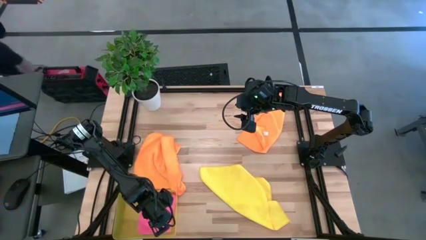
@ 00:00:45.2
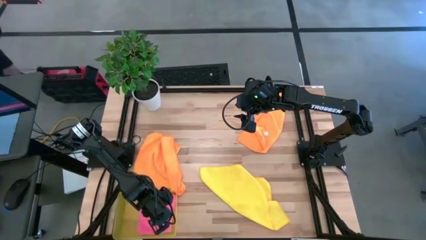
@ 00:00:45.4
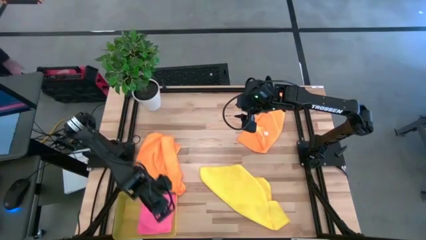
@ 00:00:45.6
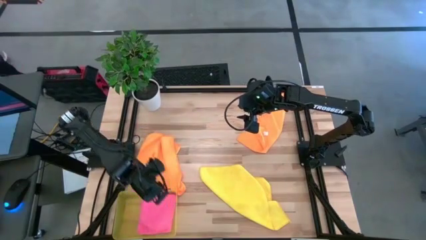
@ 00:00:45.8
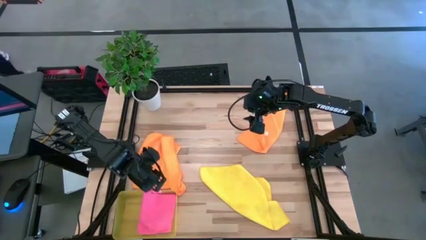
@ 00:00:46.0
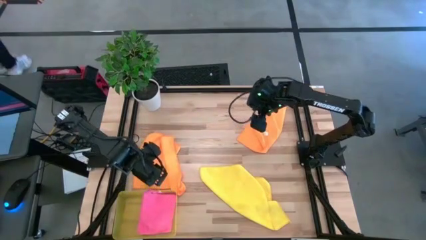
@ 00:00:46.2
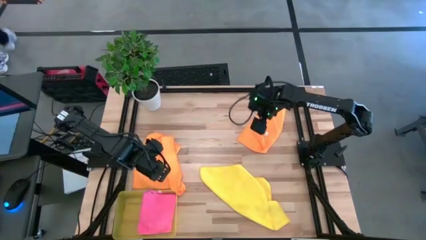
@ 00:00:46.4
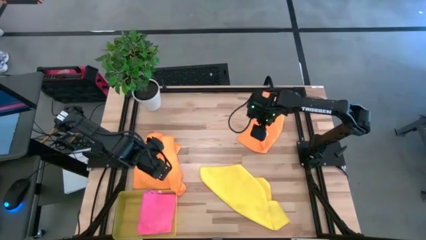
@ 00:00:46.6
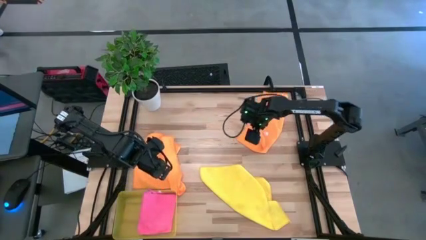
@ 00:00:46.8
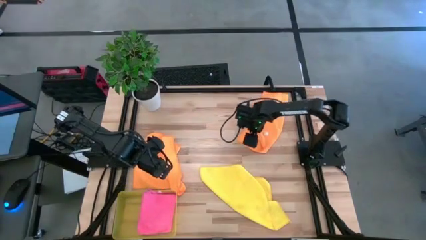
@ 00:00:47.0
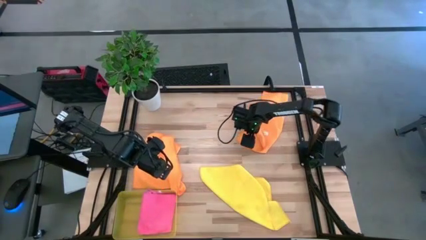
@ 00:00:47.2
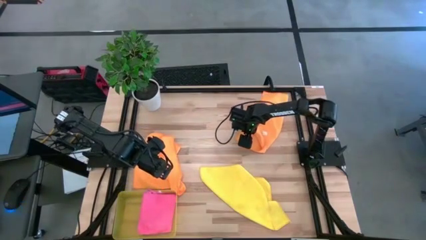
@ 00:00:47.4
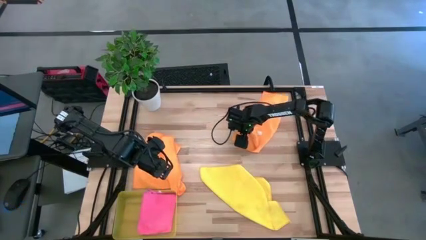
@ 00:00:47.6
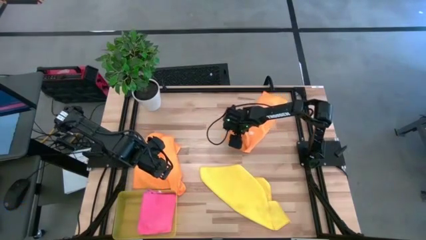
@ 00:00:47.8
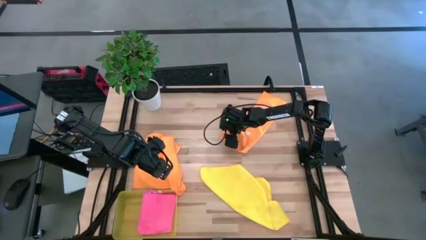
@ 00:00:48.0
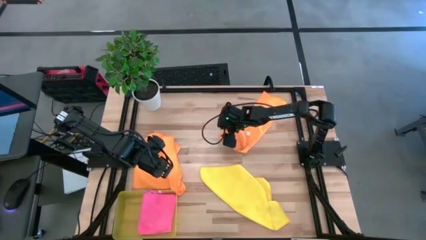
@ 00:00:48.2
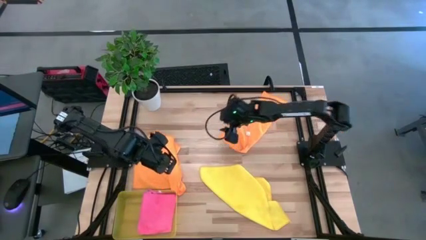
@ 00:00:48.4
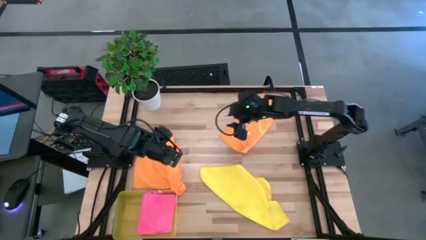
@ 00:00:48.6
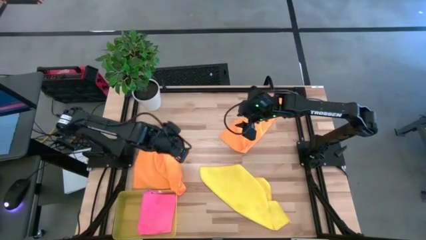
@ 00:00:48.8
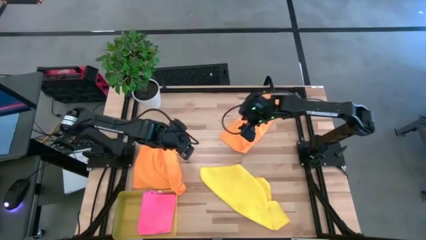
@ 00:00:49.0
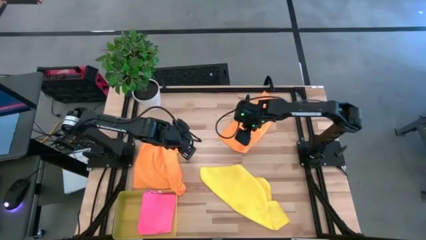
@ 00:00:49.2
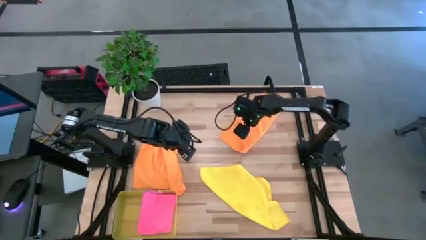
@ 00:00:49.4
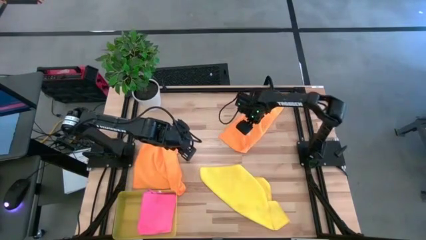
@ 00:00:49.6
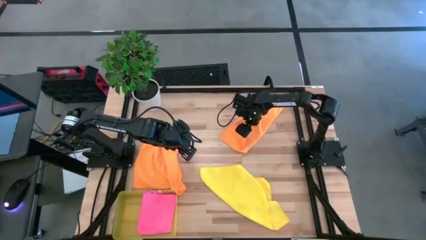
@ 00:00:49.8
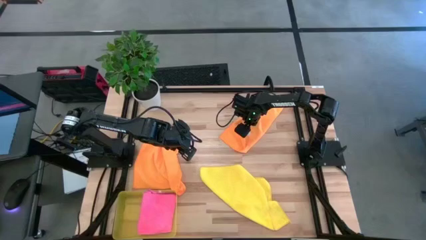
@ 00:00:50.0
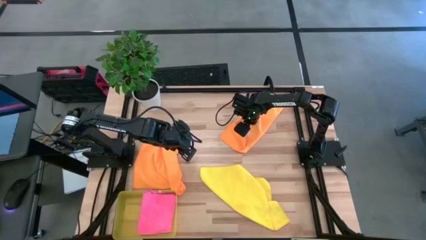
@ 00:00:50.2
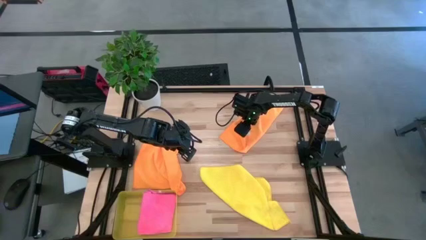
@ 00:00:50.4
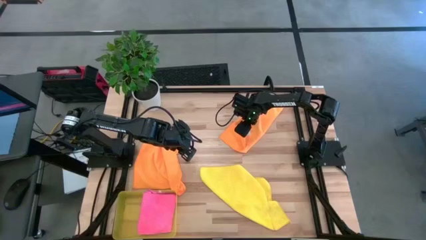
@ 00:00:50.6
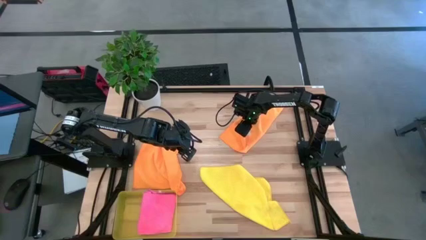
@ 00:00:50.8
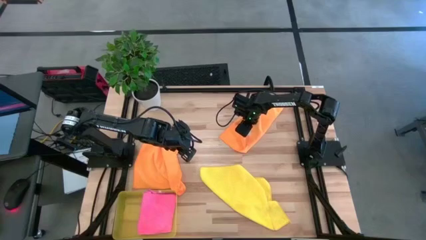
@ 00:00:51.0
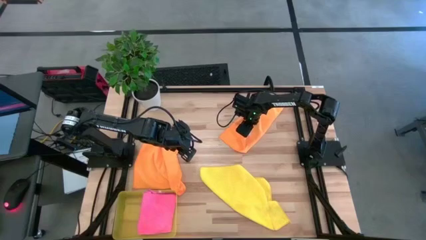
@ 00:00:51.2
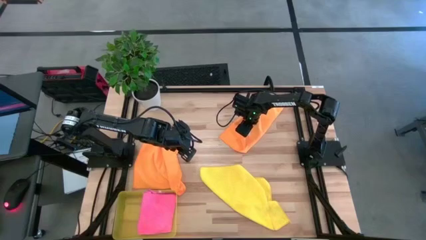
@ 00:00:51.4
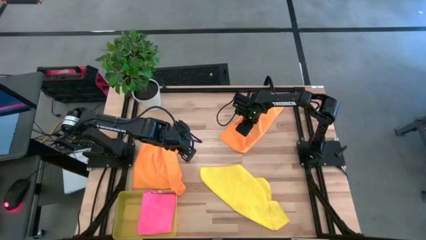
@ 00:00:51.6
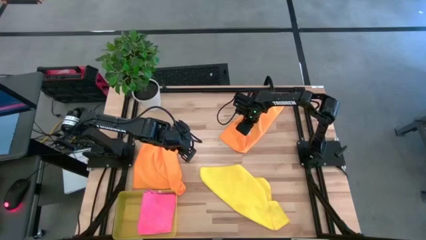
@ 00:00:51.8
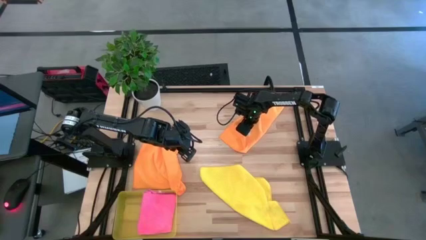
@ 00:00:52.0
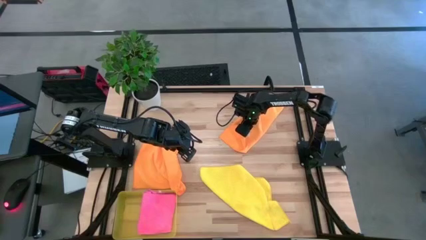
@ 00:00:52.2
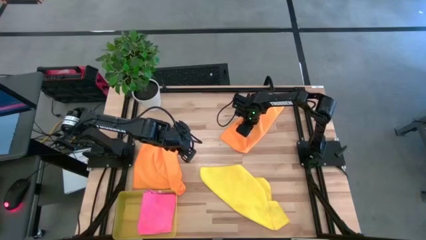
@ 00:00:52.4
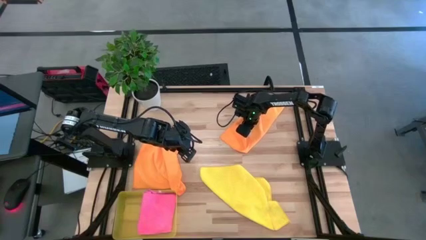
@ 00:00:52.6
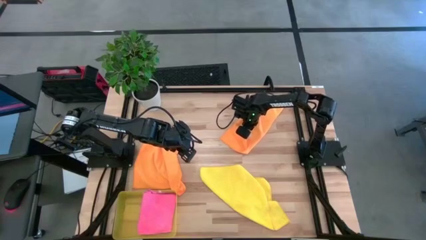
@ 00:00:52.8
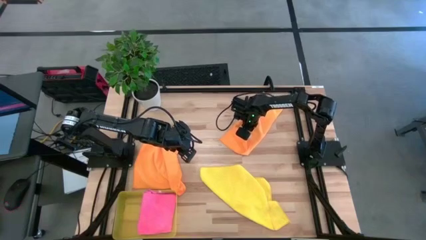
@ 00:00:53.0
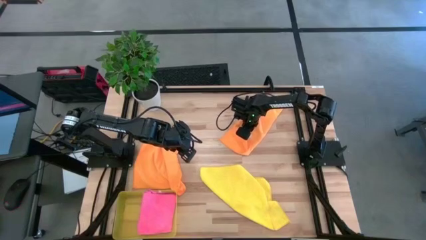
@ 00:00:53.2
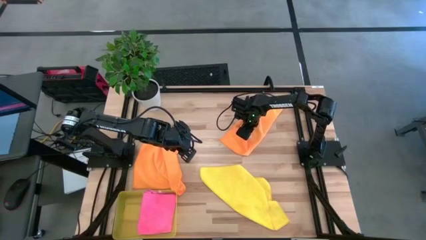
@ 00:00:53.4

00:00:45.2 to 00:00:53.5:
Task: Fold microfiber towels
Fold the top orange microfiber towel

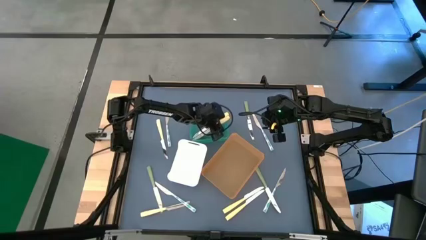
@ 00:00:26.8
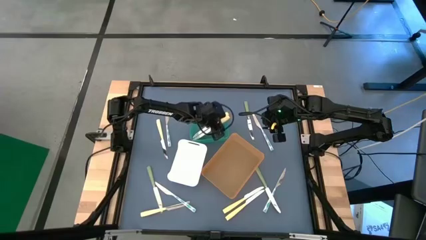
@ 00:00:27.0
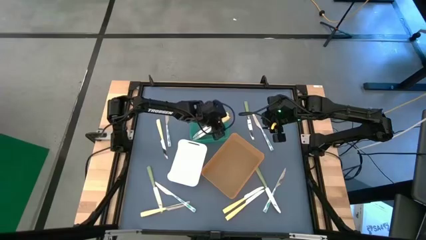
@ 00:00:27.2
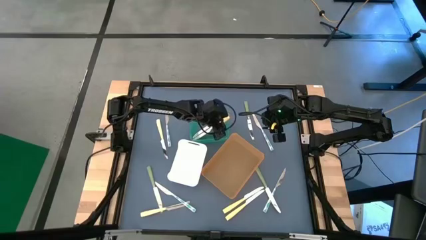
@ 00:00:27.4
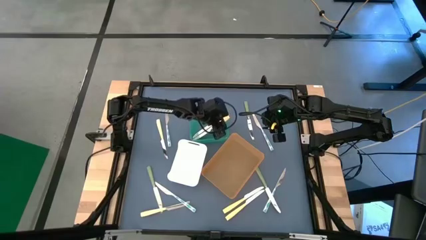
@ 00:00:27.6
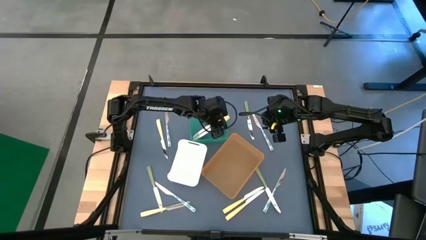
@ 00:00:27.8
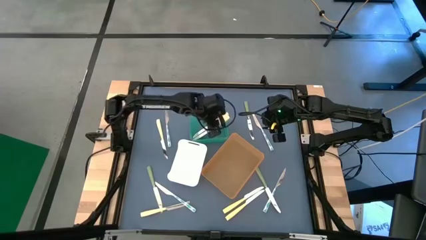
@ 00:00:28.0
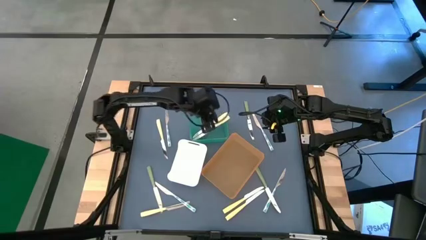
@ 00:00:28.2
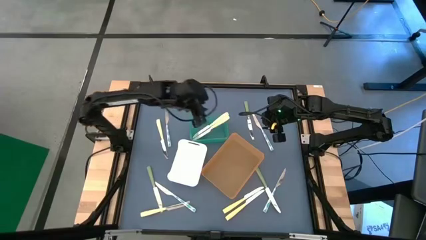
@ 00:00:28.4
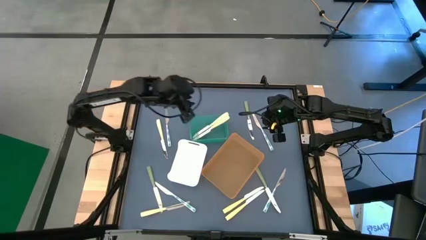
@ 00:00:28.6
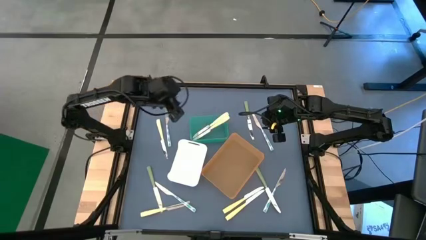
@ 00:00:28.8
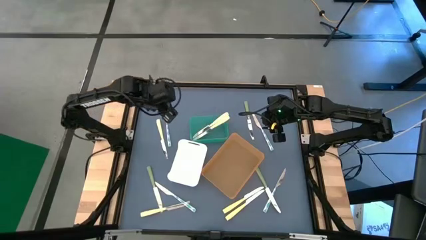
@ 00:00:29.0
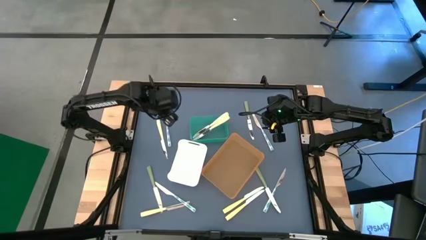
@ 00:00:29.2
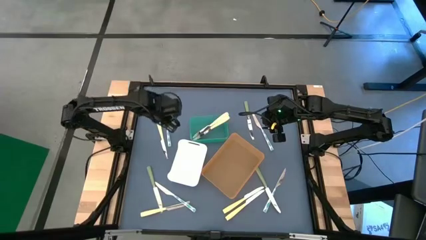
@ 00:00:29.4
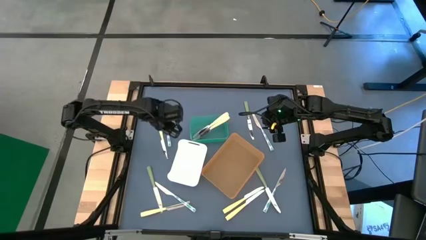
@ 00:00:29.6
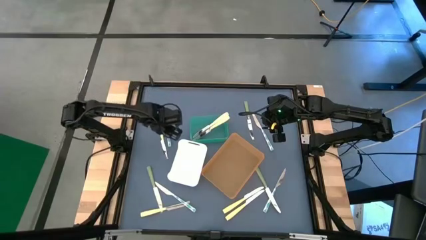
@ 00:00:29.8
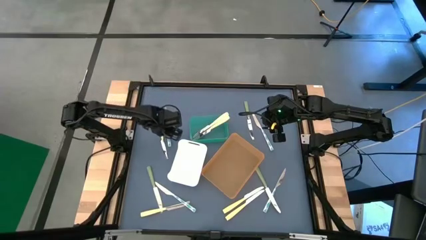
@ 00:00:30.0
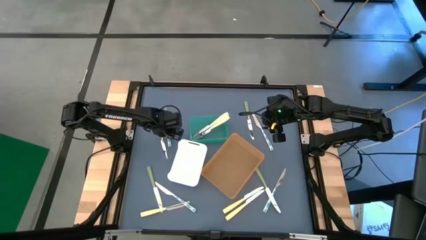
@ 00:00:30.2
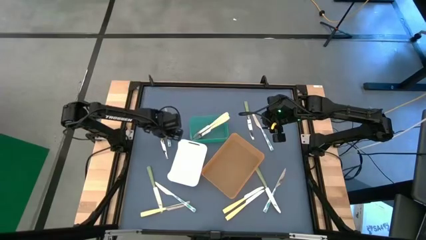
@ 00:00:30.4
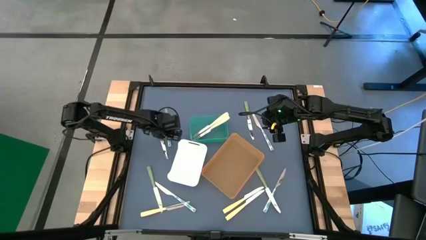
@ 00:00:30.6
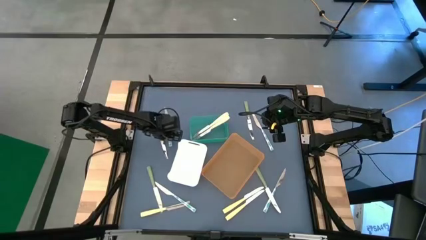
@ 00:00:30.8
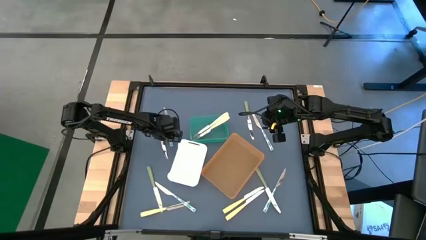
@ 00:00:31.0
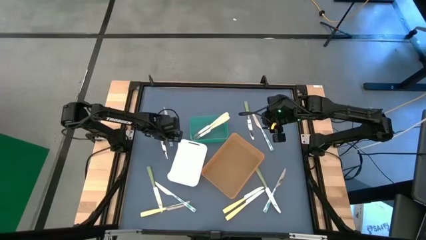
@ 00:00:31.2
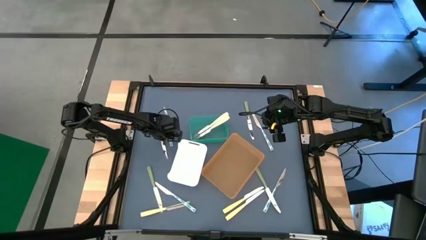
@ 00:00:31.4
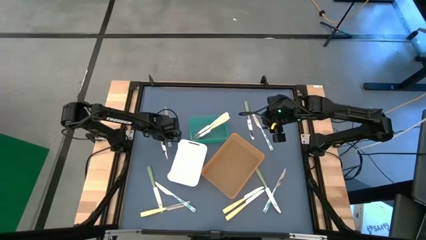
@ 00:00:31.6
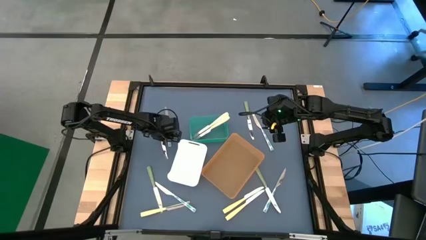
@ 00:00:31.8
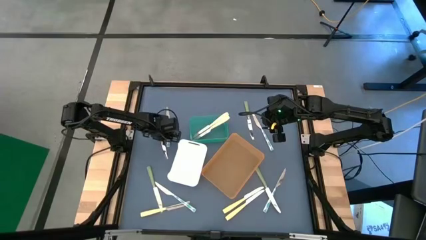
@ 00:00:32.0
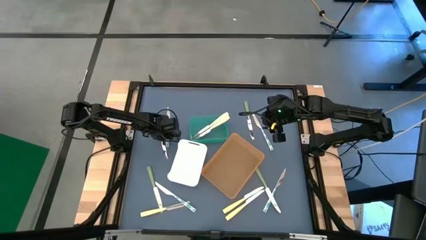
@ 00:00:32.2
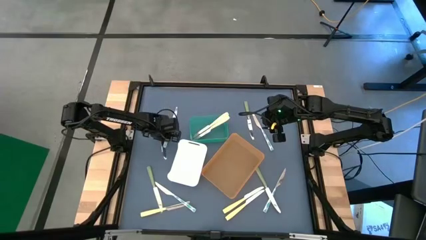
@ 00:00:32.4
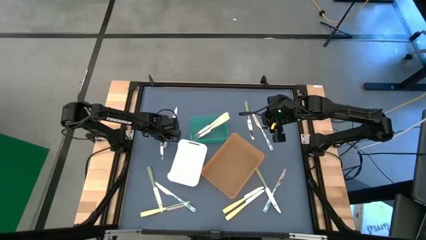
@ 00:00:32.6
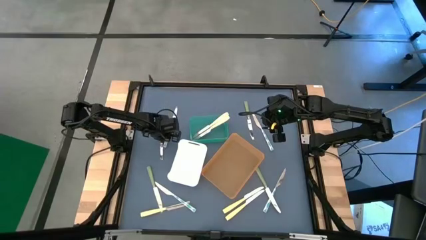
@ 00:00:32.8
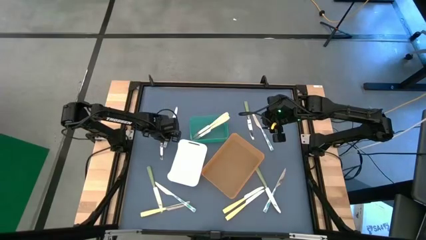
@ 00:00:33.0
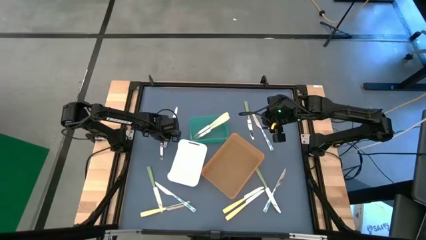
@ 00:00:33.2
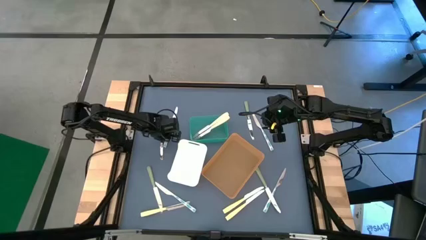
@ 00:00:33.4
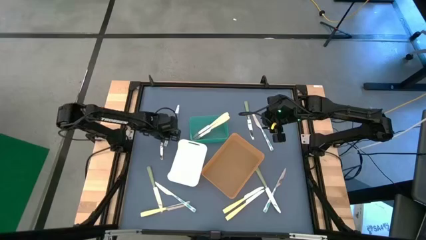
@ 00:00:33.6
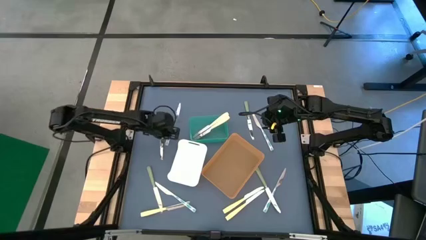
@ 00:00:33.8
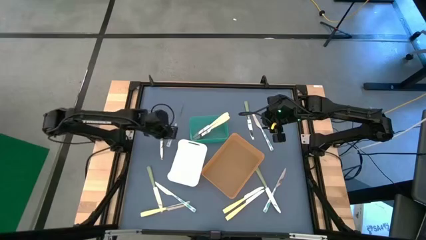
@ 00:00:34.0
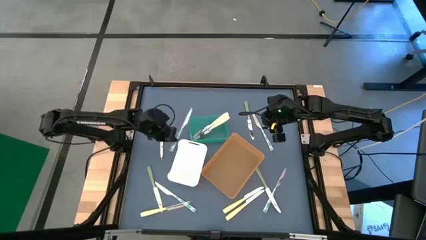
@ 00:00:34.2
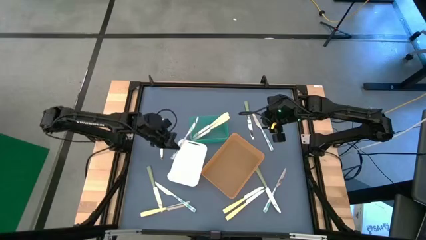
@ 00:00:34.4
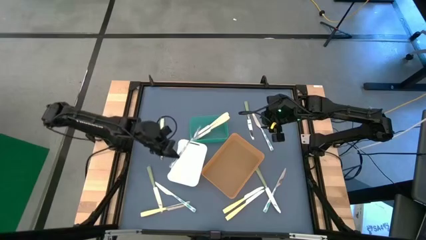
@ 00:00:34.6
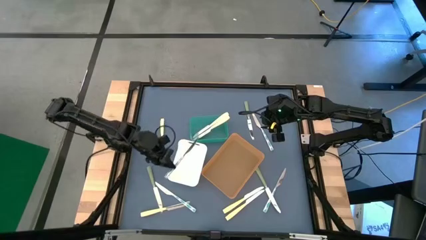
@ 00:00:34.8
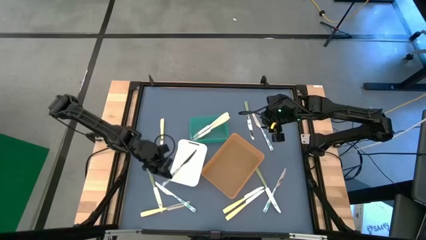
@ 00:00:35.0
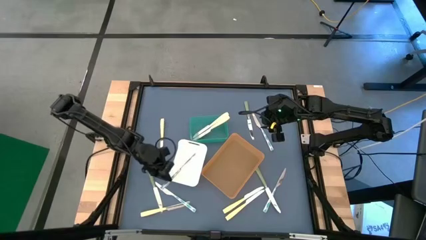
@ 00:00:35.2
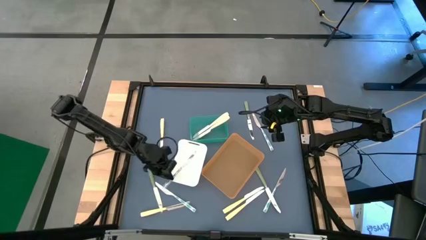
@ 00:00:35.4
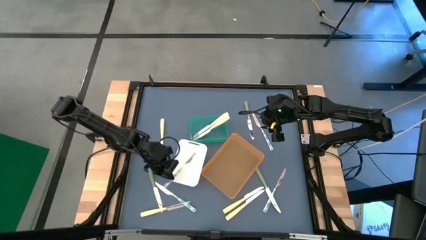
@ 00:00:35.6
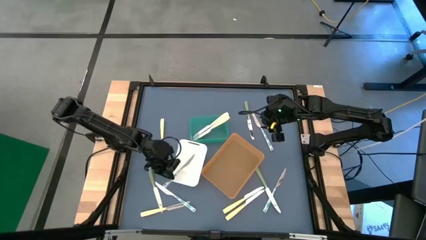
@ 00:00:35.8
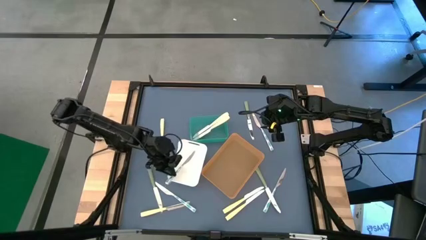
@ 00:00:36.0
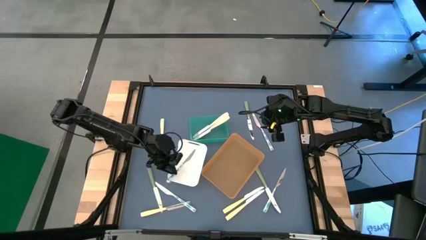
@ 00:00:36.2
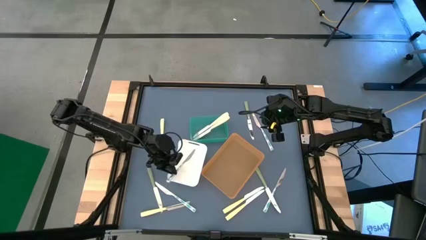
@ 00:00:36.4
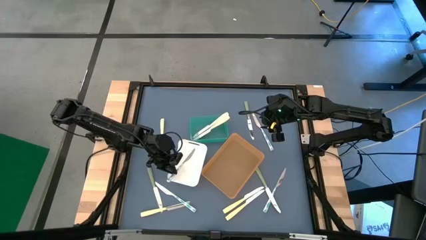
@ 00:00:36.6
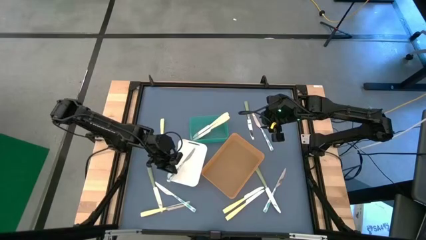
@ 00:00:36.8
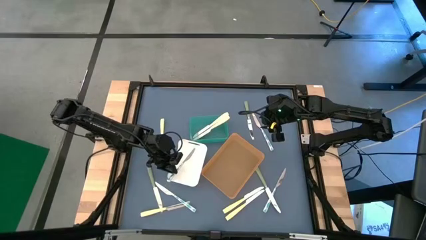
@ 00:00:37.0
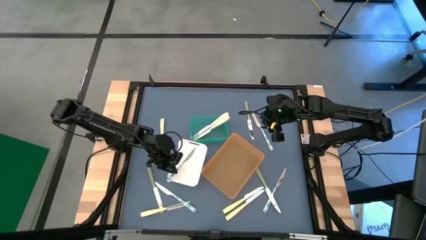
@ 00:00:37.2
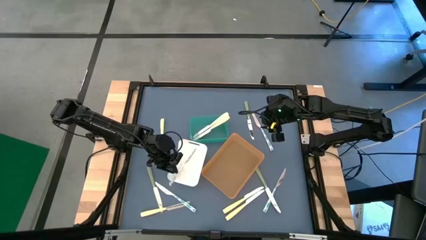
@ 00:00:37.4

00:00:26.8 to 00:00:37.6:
Task: Sort silverware by color (type)
Put the blue patterned knife into the white bin
